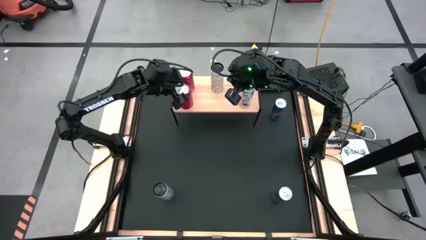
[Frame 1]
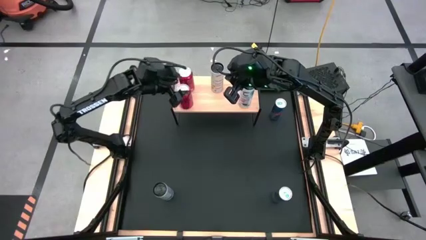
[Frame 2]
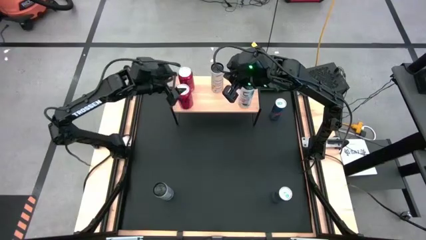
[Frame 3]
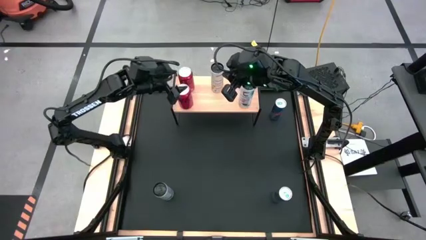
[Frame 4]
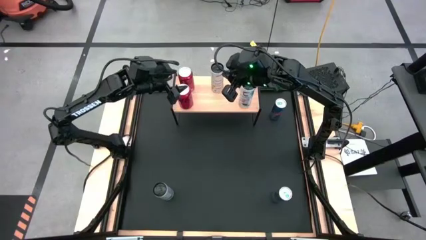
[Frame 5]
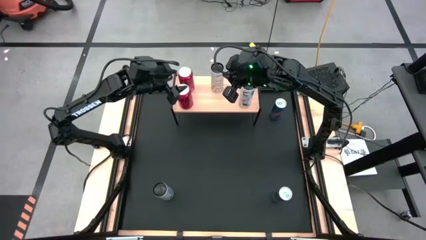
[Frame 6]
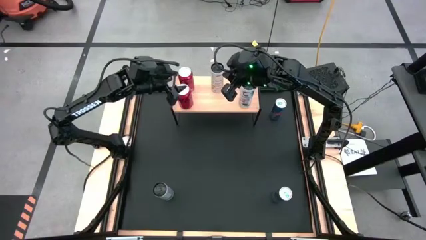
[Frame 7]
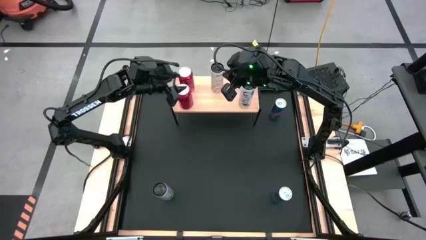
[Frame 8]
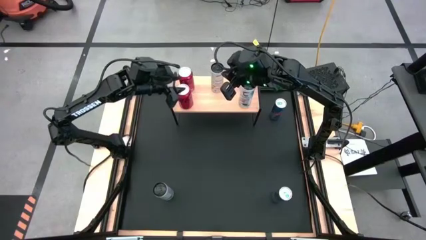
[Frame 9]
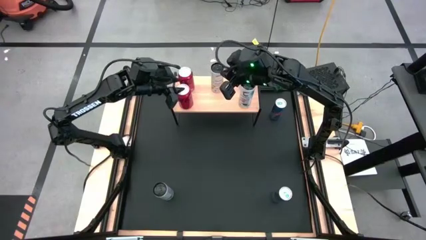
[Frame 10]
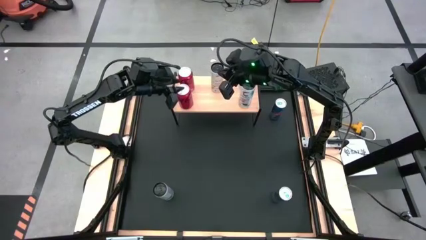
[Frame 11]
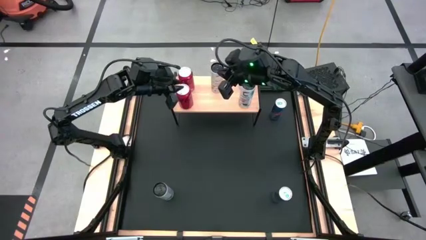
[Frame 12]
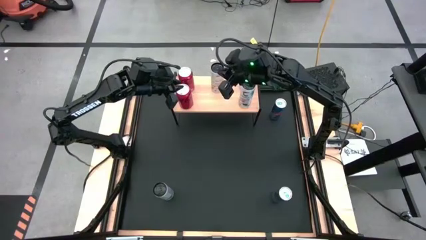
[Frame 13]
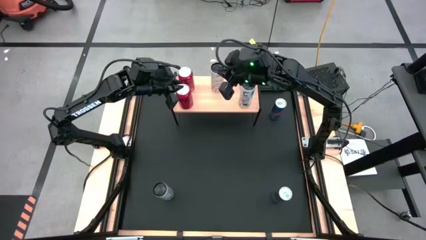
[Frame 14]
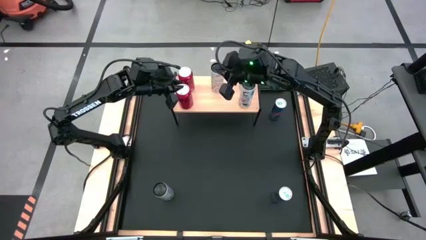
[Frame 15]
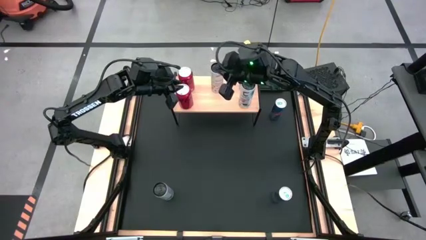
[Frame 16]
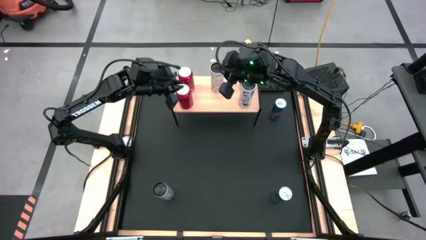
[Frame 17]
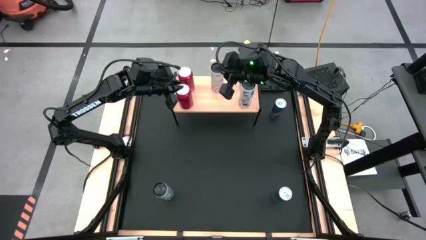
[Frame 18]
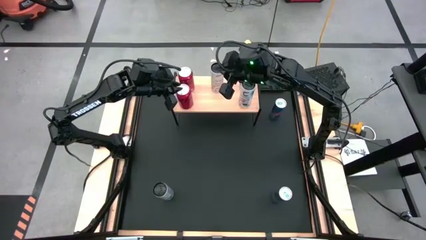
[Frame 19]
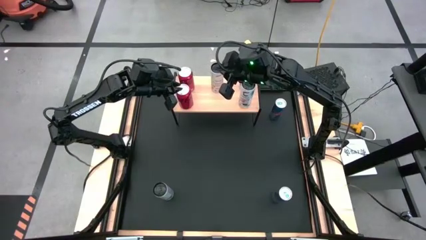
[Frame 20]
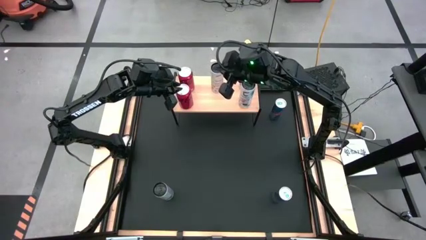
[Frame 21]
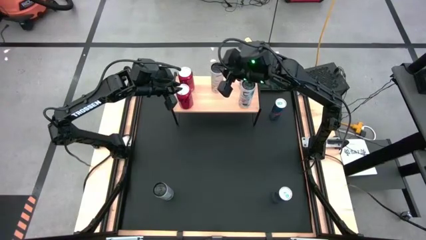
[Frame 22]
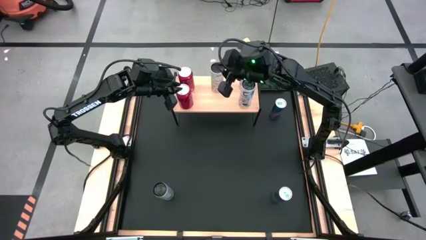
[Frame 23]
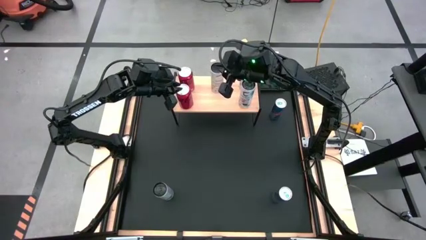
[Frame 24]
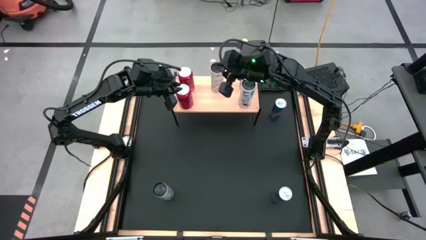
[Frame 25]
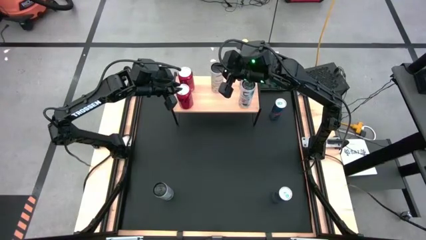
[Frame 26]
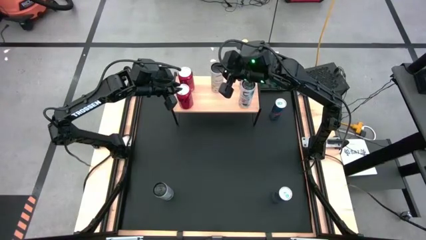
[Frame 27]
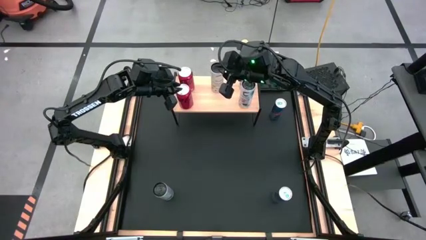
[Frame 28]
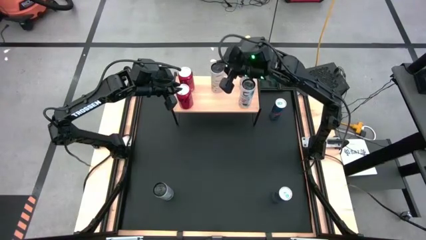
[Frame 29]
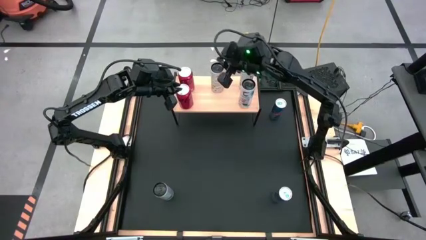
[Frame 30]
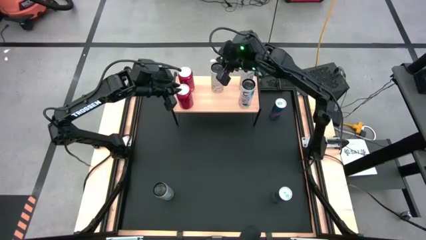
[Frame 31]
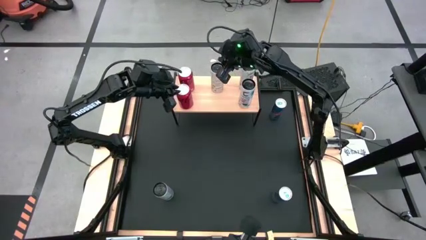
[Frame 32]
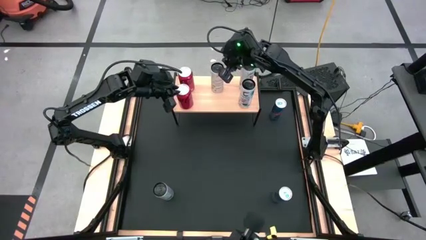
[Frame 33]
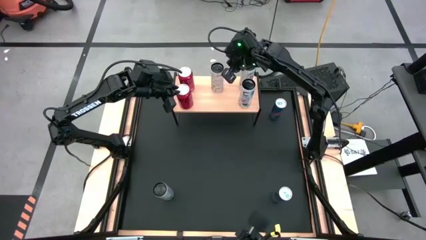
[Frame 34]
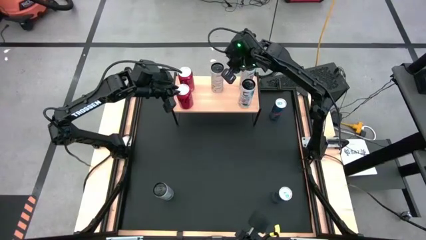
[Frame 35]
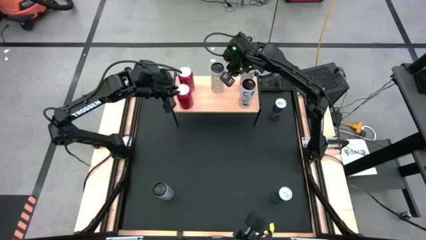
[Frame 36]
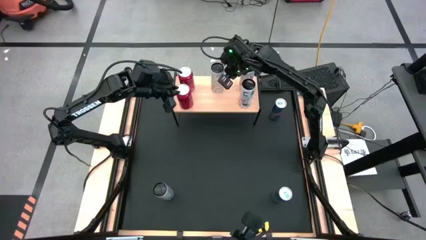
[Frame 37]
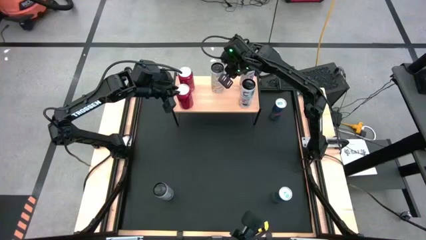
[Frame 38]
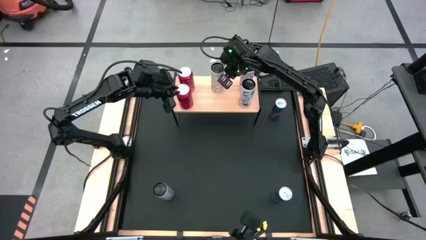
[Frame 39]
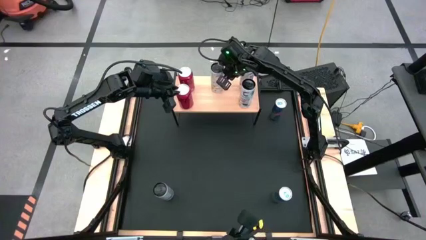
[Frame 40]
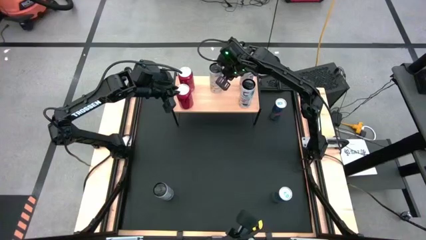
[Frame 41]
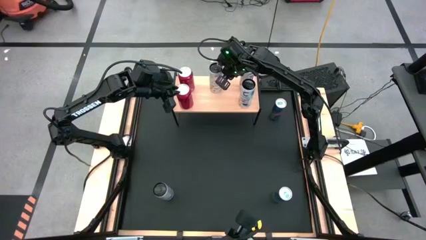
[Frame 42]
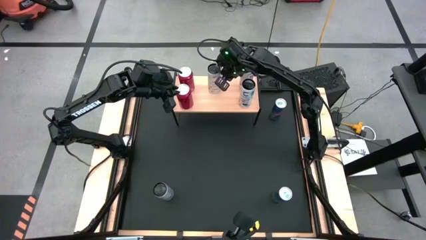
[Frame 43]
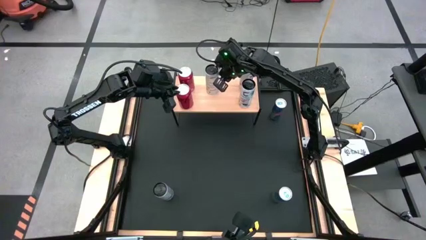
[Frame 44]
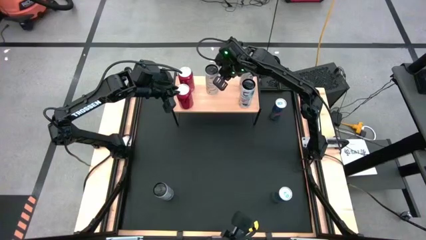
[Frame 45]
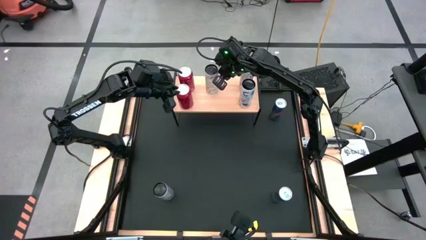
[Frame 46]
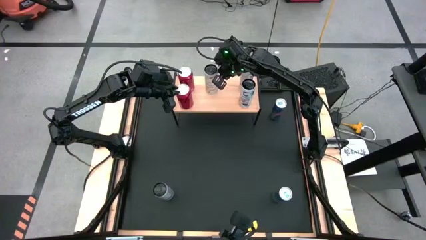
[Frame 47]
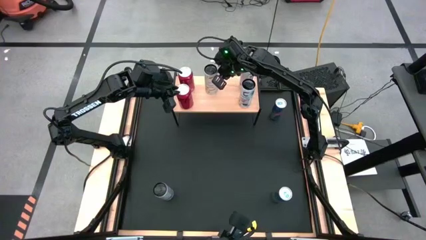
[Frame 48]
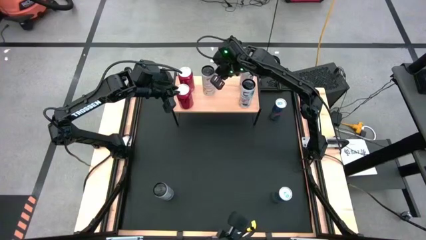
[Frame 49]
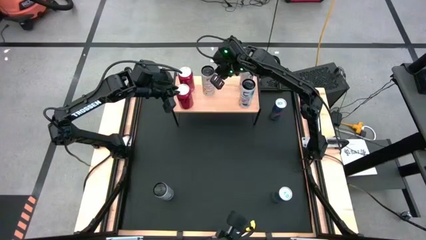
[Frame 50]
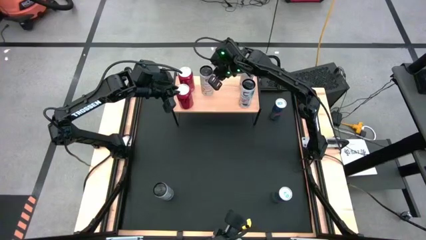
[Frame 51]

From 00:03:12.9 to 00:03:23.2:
Task: Place canned beverage on shelf
Adjust the white yellow soda can on the shelf

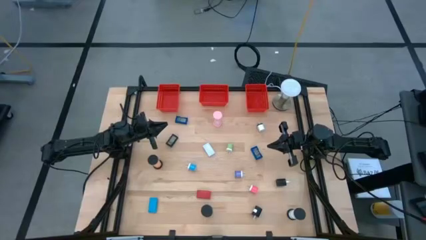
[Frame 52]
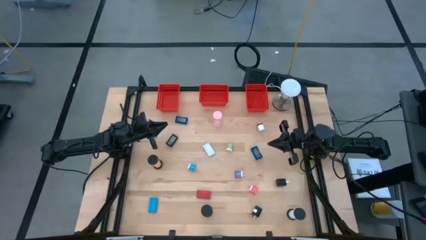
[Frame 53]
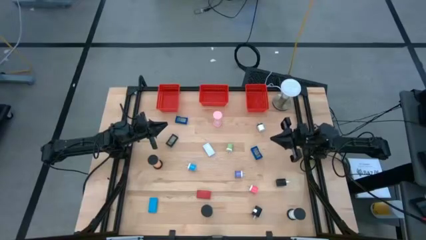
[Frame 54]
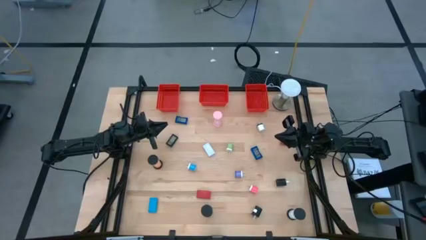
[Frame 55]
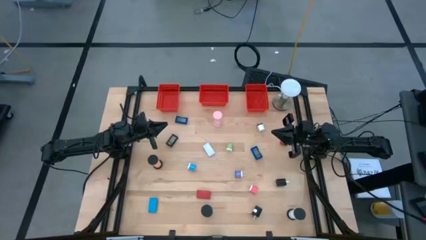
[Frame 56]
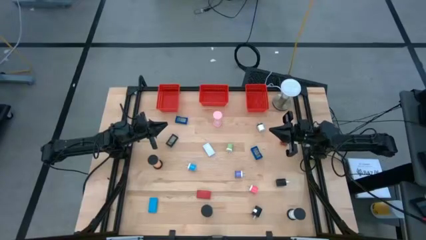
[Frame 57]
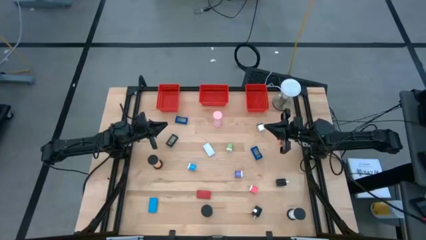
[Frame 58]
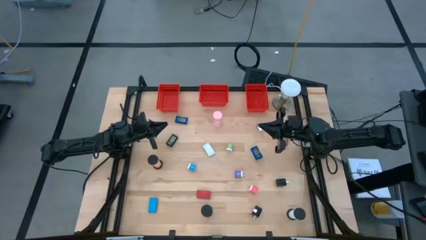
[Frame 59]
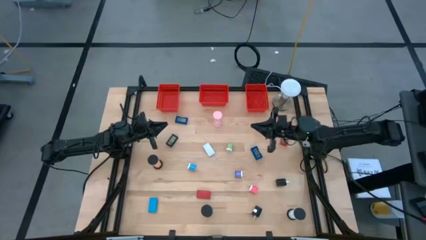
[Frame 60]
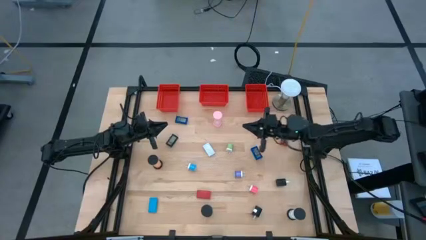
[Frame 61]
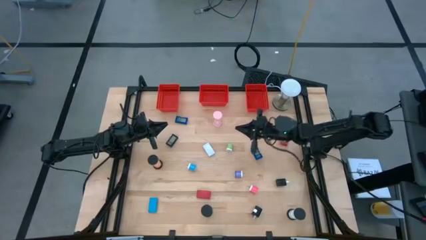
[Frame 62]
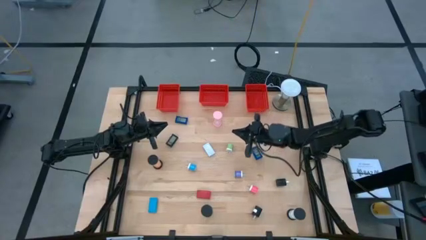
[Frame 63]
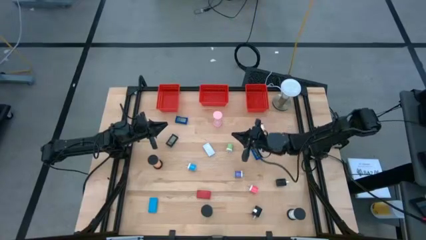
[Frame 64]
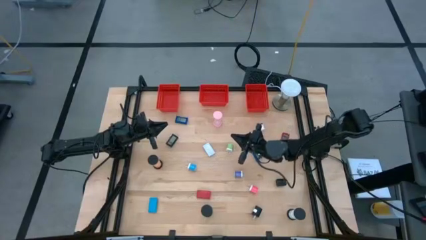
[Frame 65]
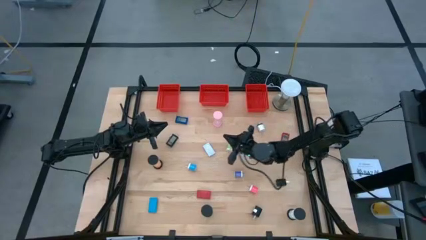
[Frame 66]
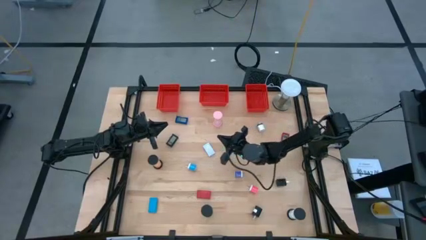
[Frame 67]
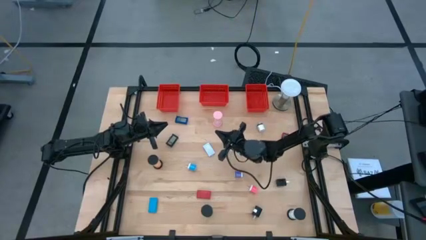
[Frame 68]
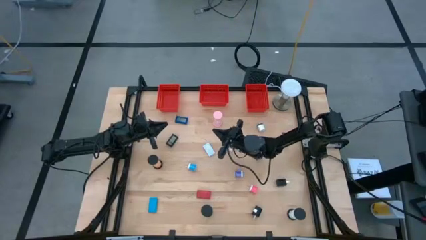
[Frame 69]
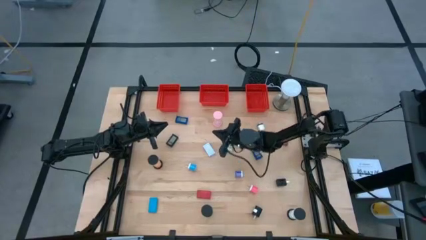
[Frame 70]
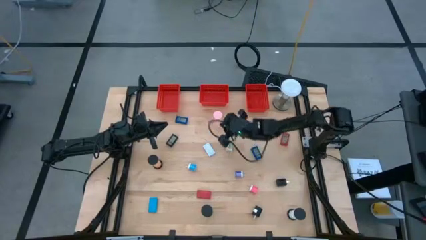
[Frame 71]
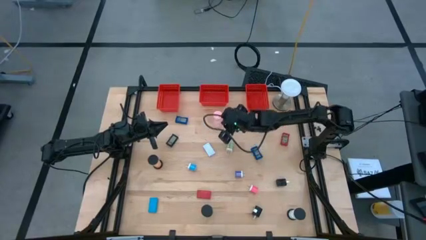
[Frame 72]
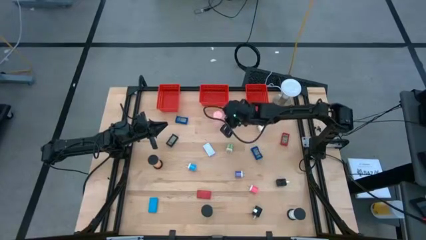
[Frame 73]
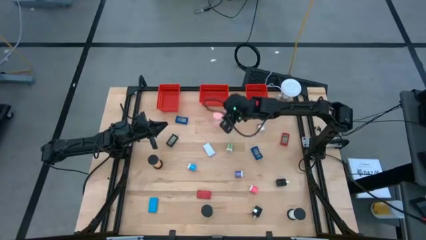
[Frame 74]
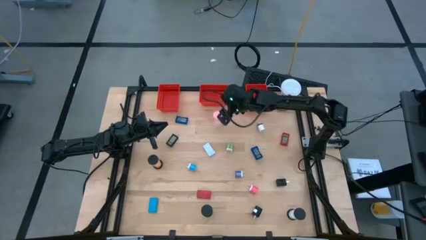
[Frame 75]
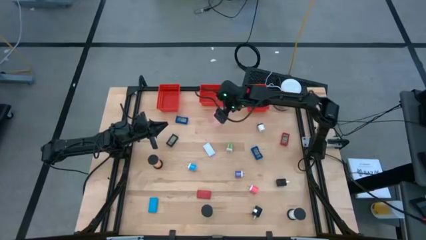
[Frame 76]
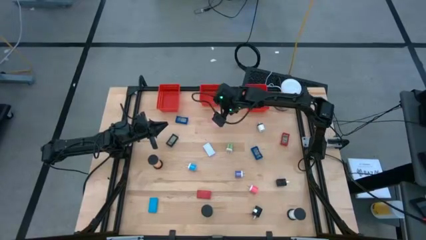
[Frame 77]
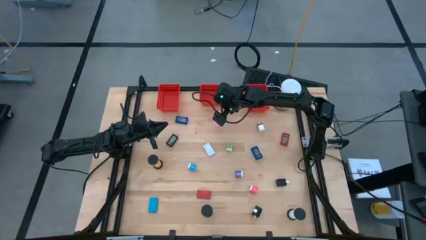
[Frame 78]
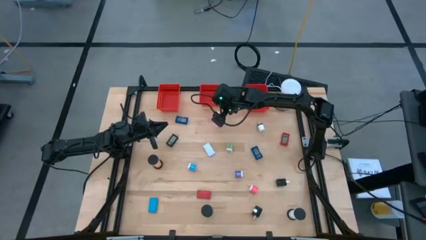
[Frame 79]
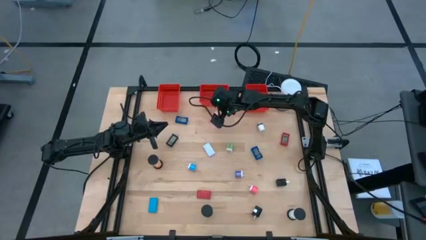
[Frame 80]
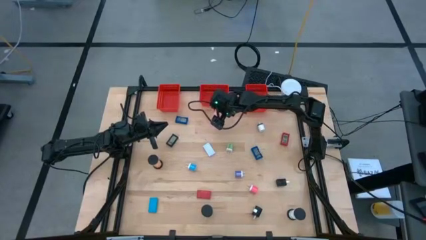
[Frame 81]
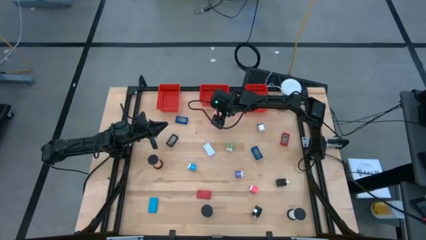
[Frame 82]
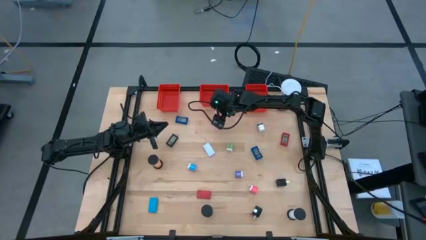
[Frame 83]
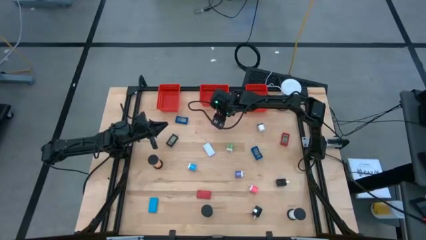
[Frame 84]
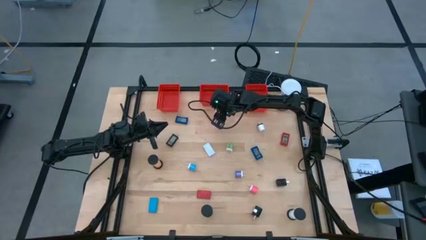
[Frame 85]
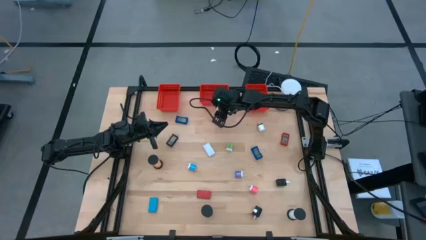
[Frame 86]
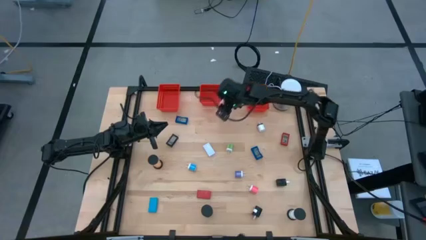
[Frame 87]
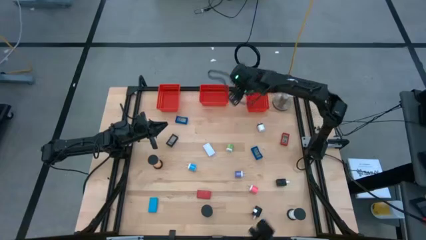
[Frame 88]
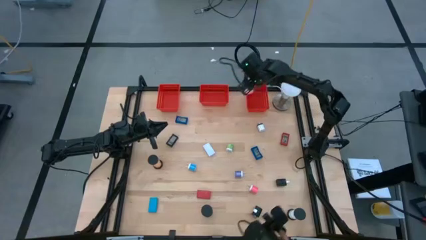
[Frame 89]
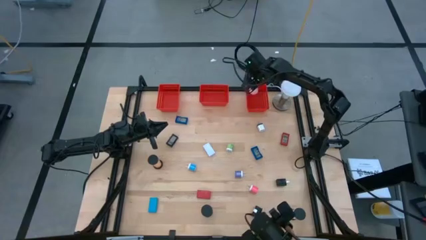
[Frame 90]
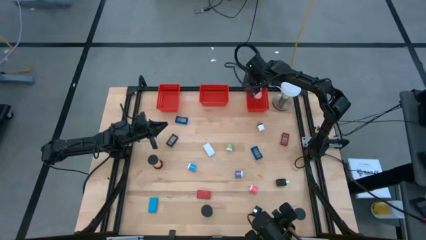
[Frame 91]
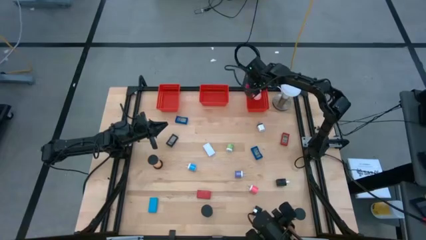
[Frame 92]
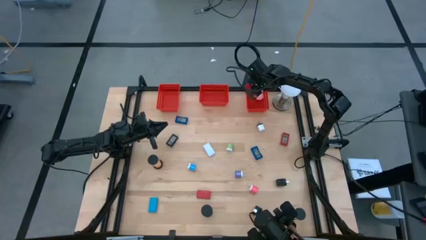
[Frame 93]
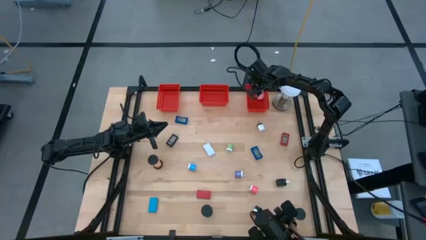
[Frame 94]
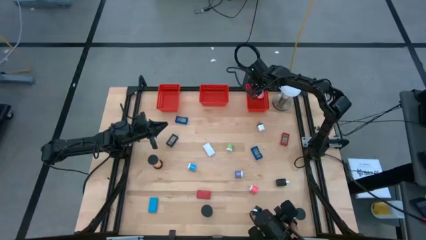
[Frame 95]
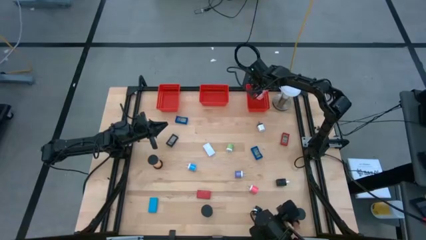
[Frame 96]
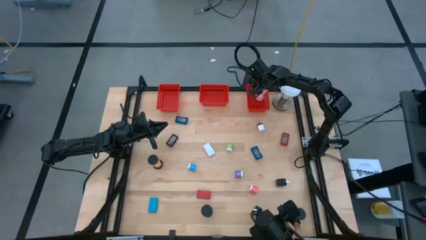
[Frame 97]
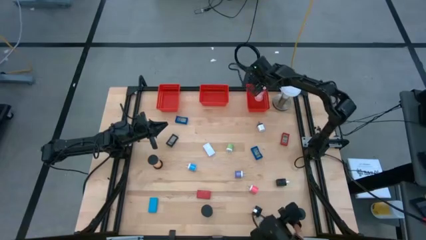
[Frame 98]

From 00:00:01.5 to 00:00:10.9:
Task: Pick & Place Office items
Put the pink hour glass into the right red bin
